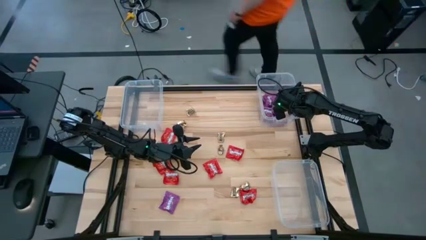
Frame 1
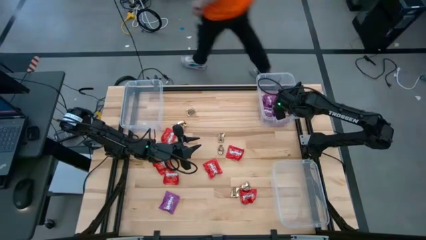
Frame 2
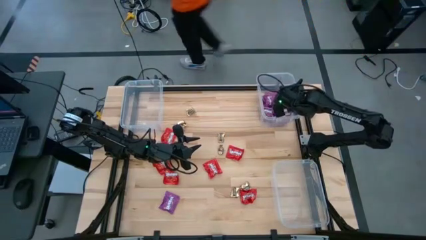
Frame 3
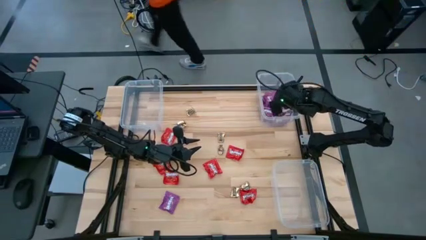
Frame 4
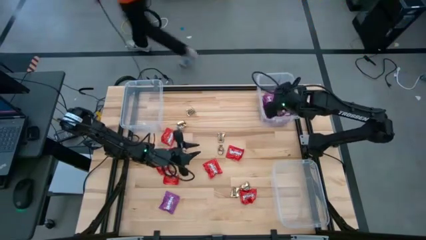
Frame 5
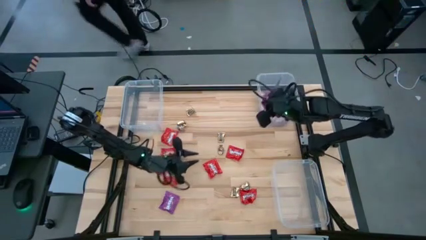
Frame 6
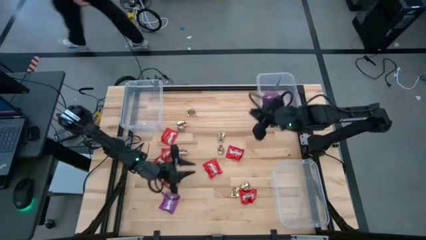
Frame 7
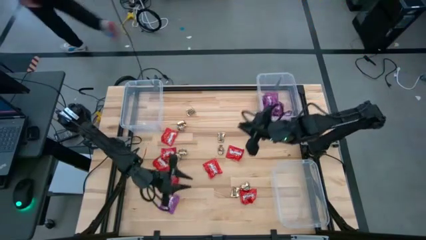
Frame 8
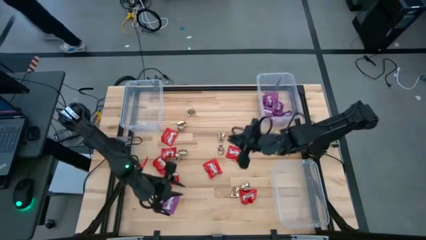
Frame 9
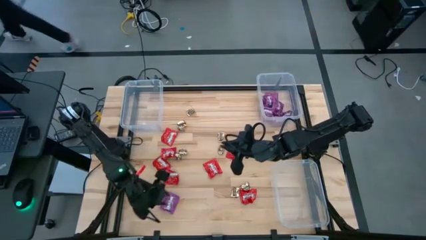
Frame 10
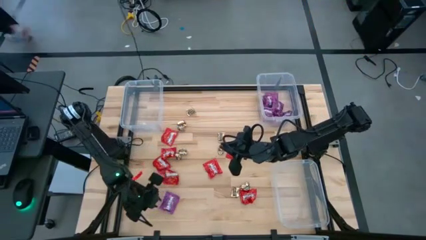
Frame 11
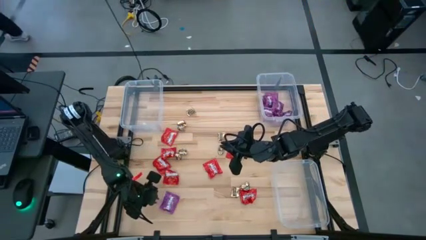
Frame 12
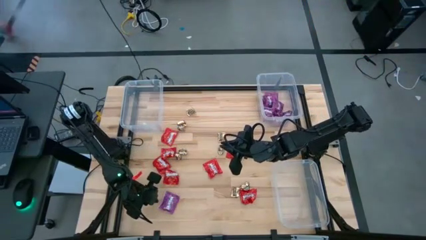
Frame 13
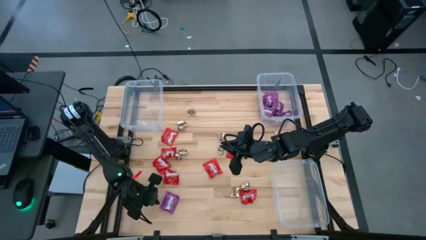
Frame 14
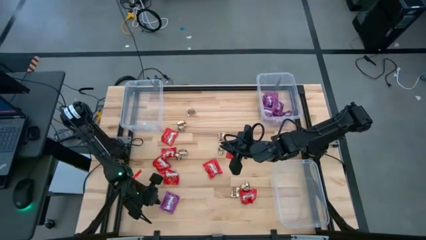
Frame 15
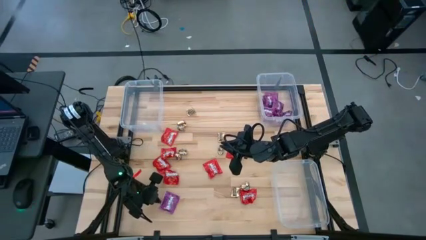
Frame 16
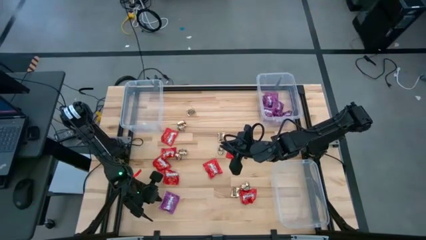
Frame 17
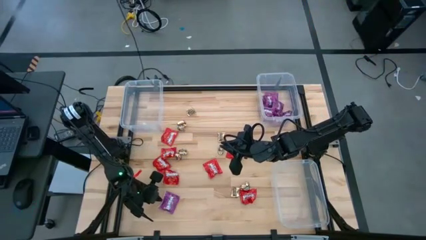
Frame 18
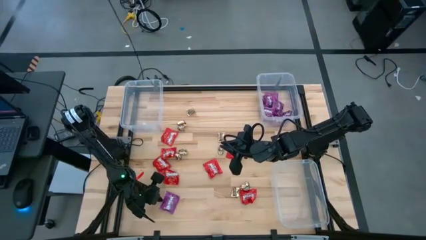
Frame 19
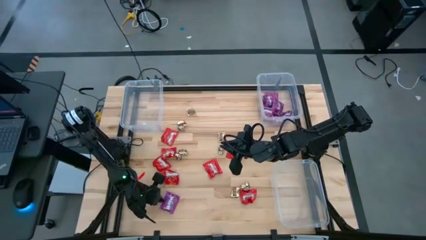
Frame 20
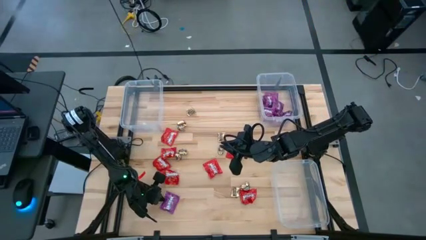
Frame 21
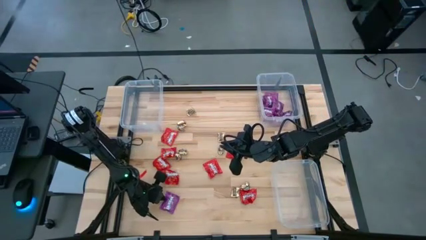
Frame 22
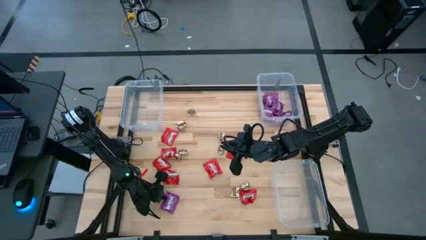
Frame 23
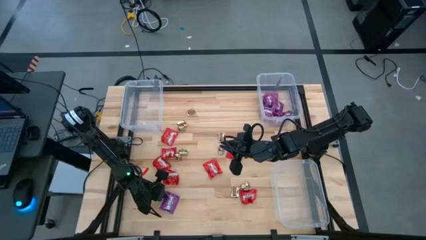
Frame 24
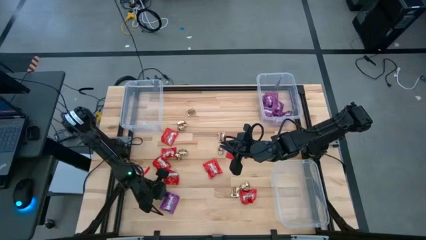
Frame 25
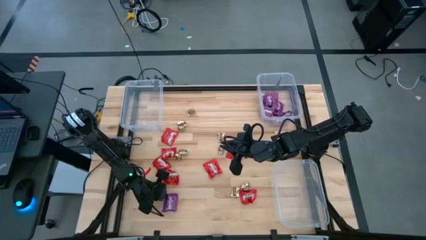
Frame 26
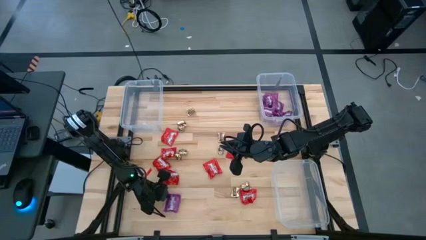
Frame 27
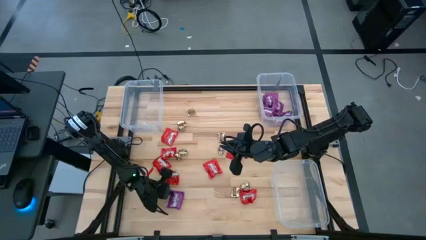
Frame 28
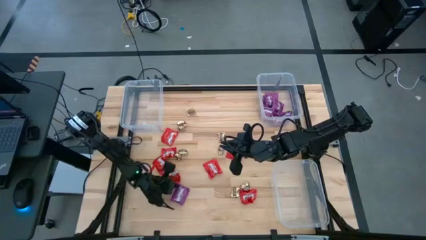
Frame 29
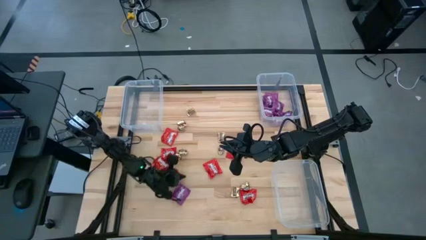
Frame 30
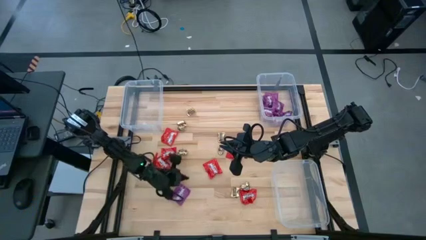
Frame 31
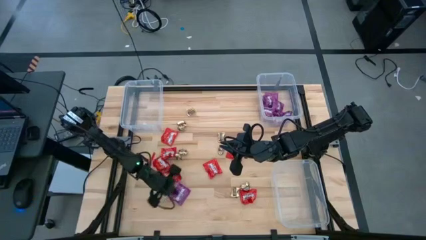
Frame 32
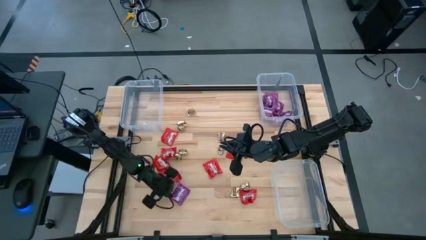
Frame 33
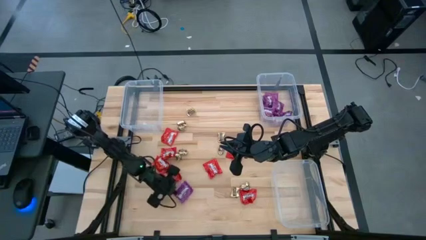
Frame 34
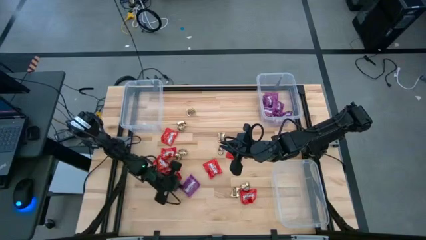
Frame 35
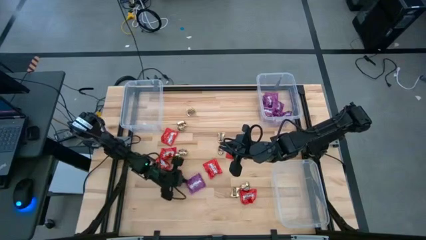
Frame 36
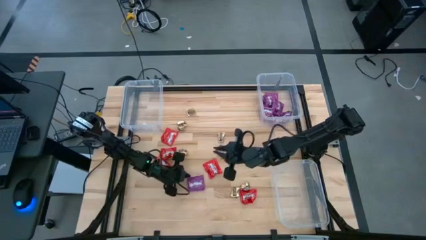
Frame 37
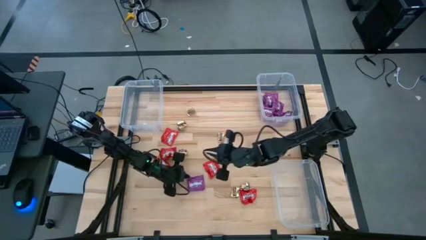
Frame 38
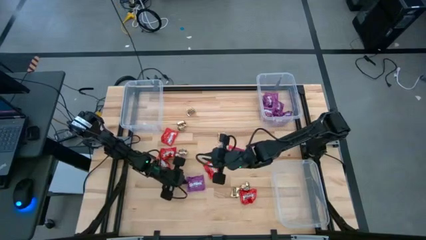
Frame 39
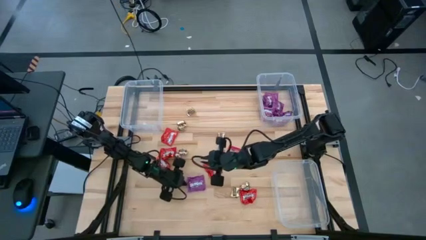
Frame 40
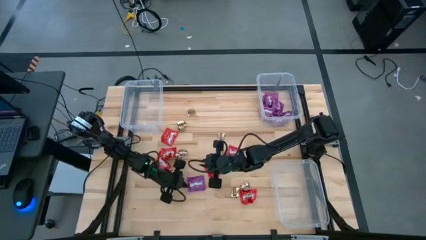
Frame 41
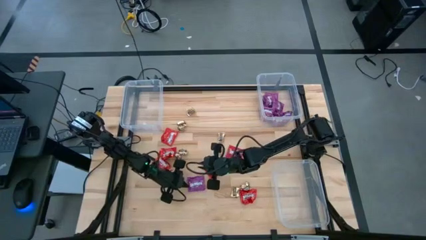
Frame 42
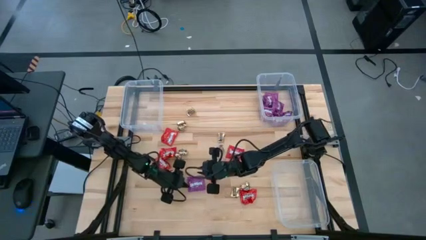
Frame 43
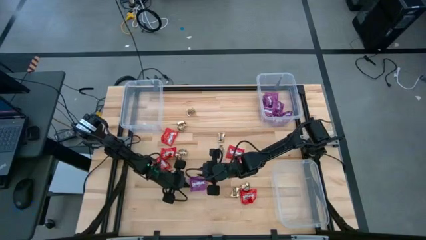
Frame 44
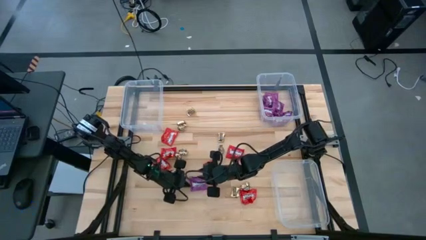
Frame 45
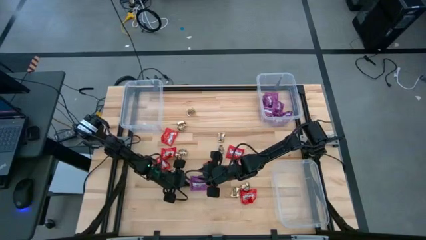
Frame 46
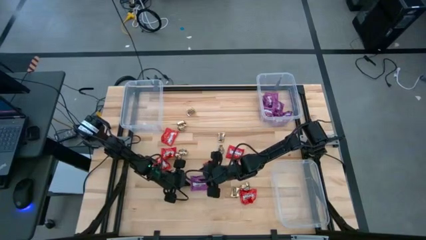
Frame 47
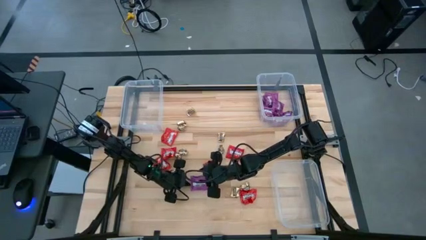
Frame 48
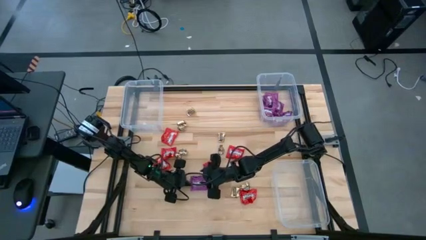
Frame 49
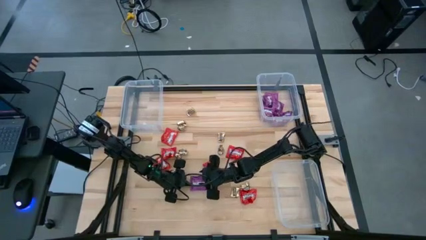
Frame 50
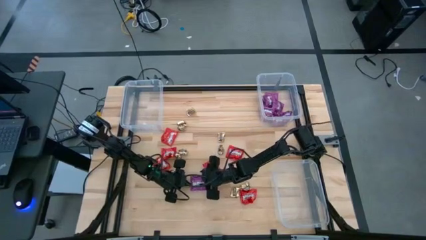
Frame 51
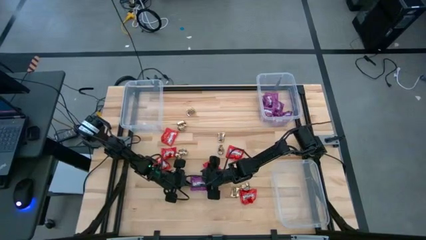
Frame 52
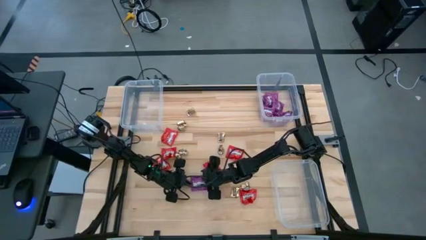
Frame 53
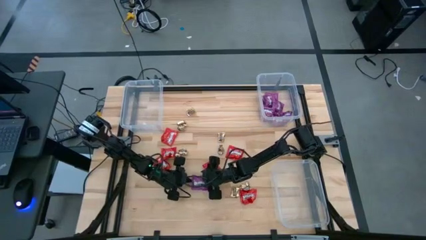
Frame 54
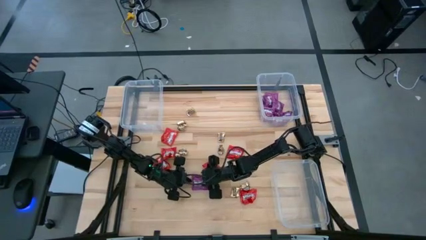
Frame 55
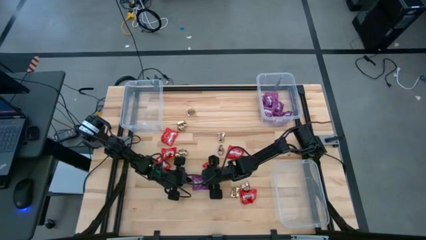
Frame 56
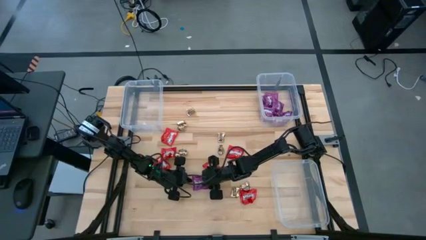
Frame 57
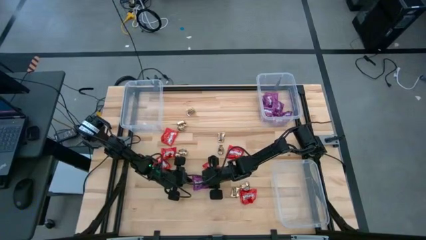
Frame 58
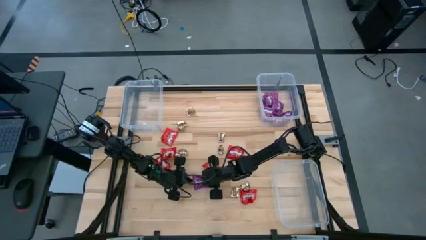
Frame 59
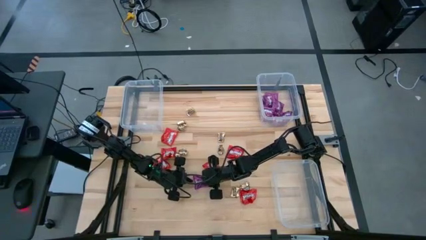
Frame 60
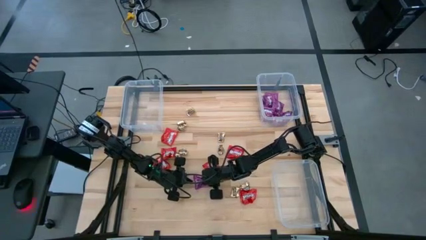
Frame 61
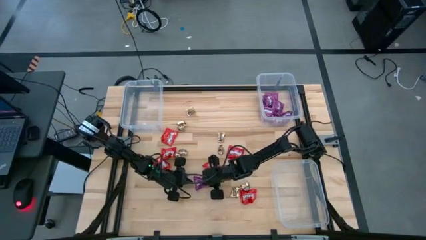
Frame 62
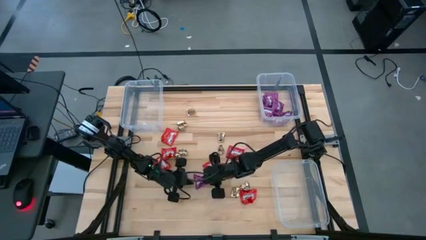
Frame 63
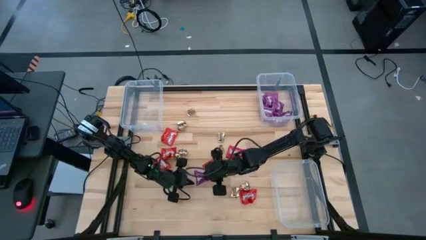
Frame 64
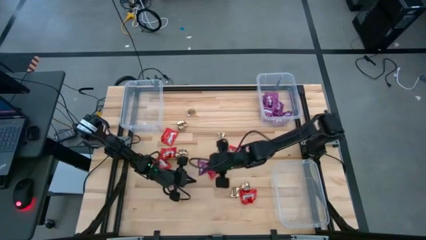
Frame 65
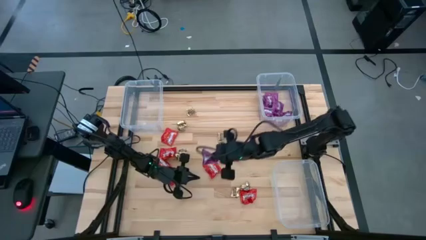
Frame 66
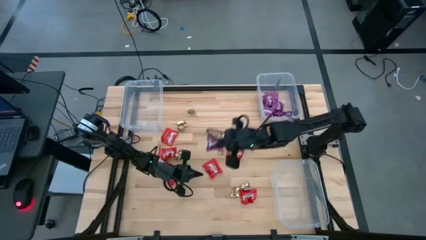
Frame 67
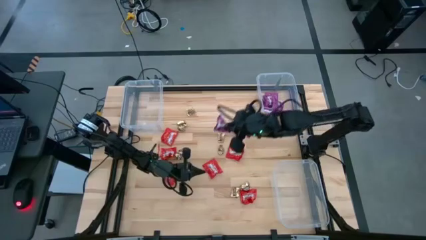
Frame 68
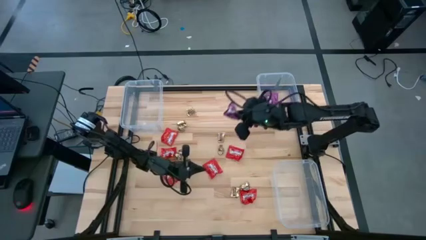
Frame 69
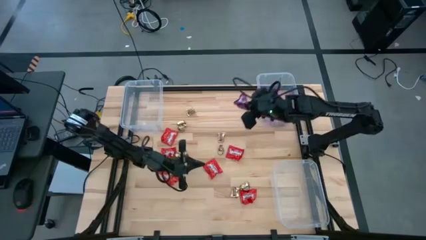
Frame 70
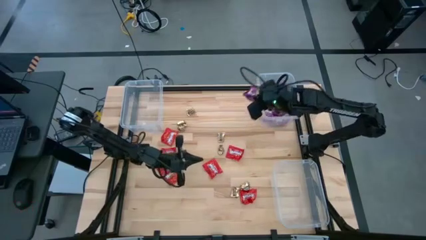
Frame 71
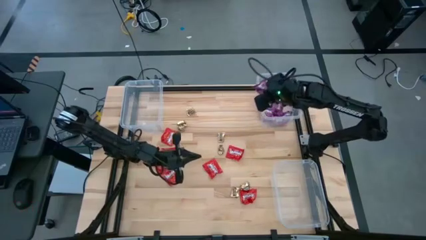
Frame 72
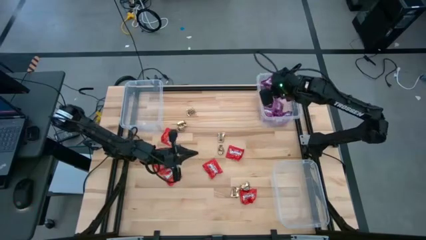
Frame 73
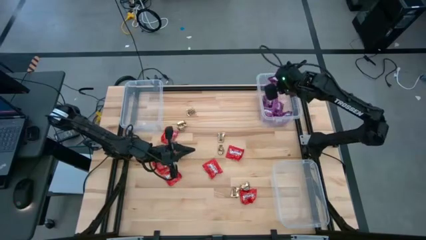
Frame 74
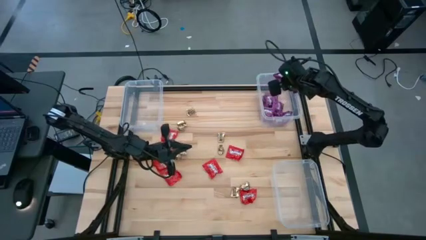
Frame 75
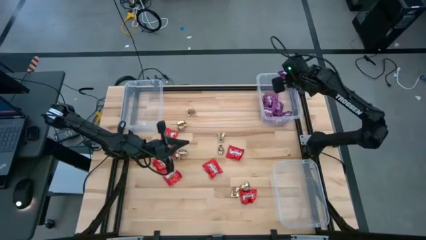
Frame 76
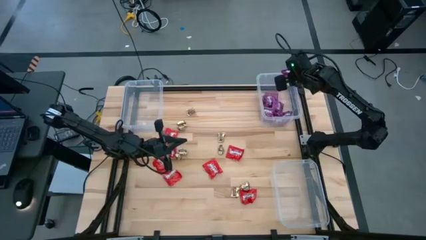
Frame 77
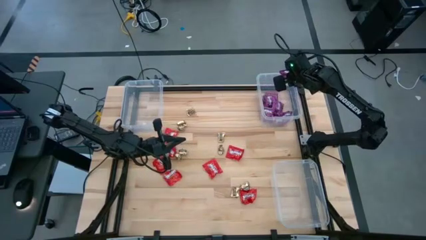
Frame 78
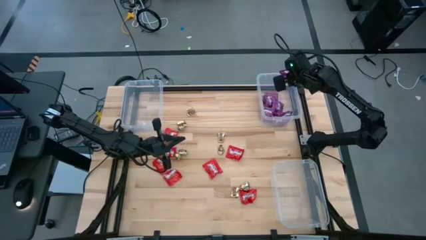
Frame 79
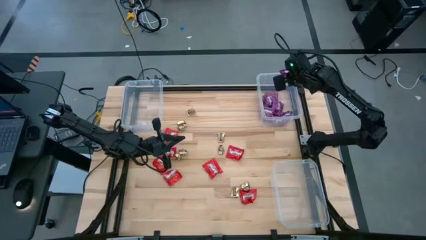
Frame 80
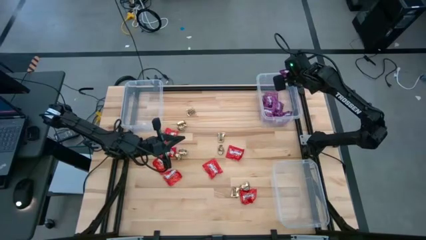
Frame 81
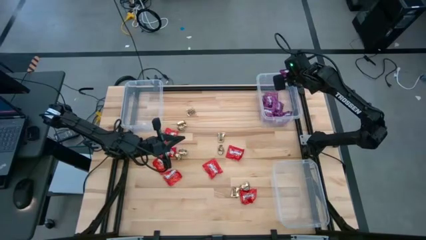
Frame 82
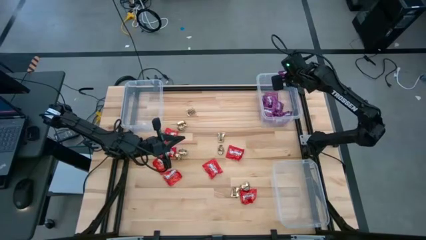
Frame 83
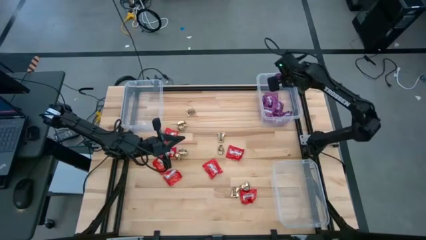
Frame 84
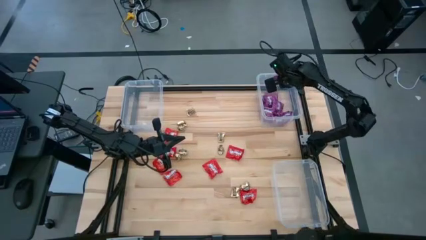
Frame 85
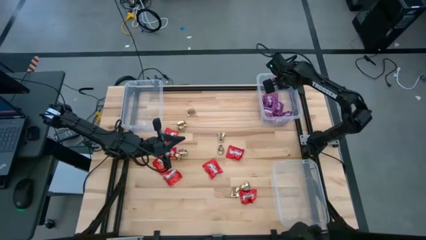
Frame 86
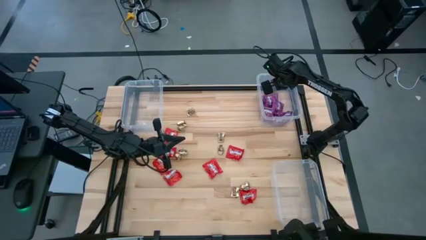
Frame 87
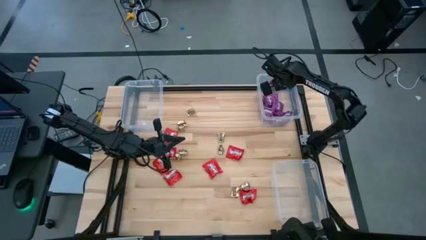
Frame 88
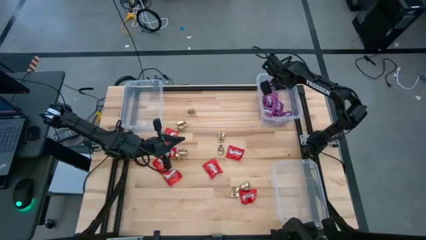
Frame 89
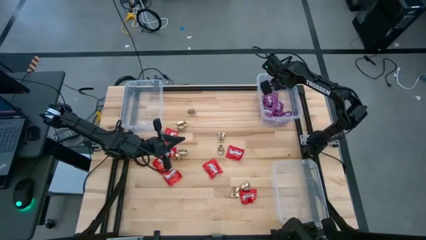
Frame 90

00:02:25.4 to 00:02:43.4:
Task: Sort candy
Put the purple candy into the top right transparent bin
